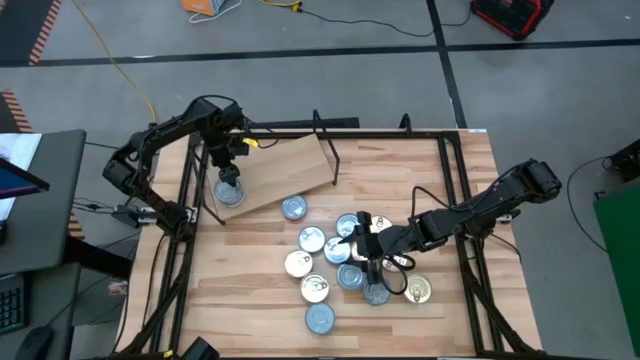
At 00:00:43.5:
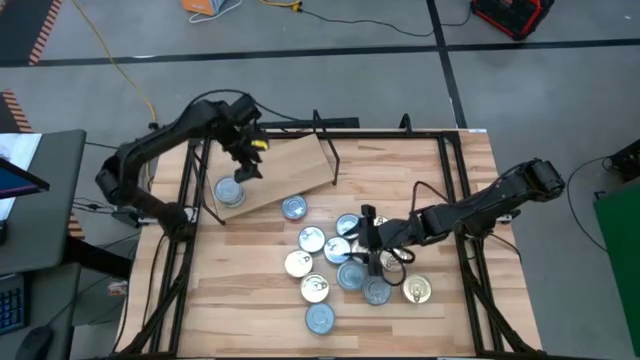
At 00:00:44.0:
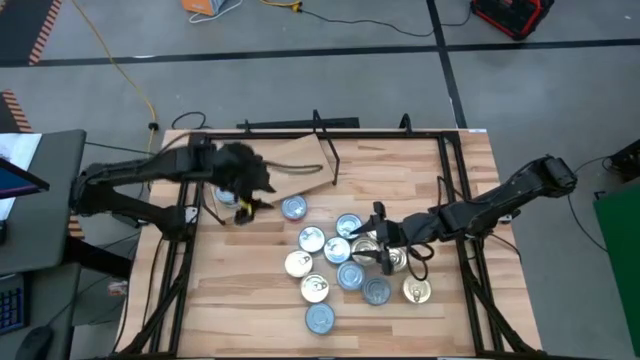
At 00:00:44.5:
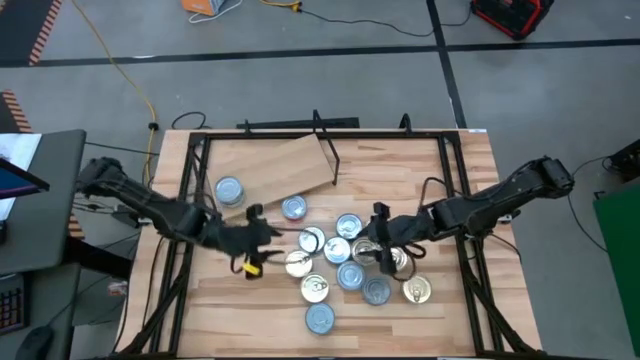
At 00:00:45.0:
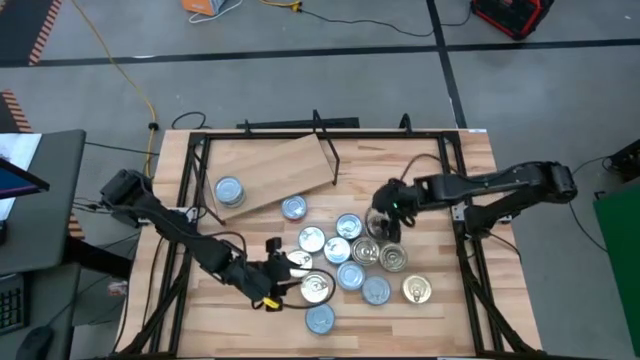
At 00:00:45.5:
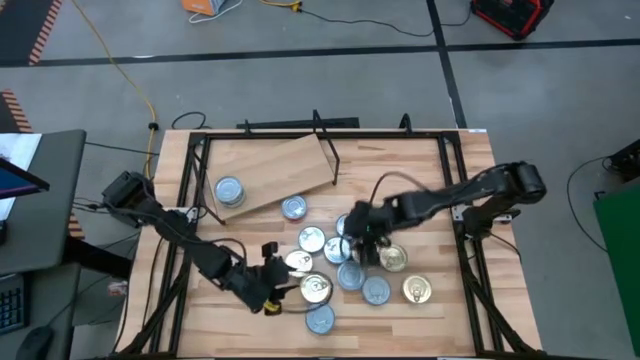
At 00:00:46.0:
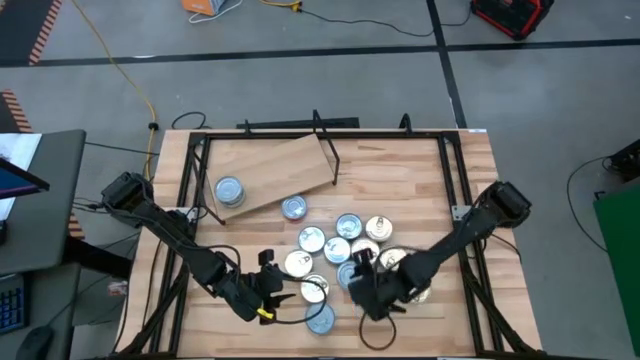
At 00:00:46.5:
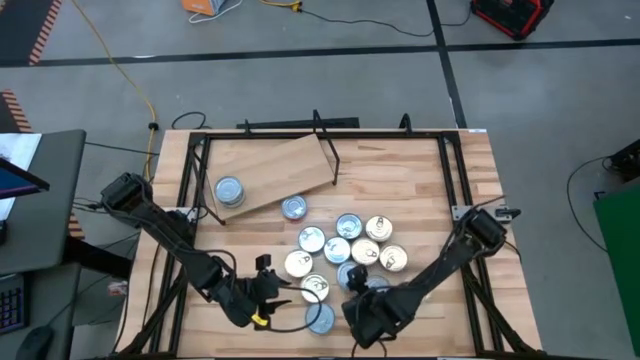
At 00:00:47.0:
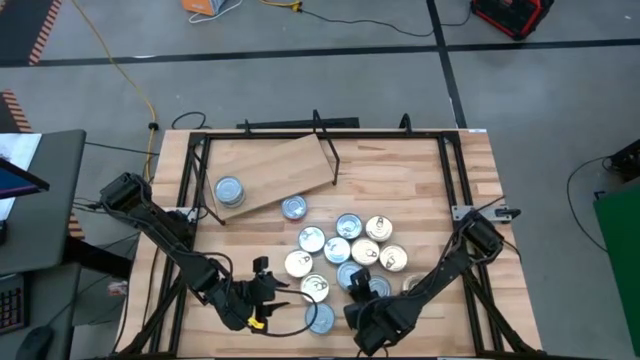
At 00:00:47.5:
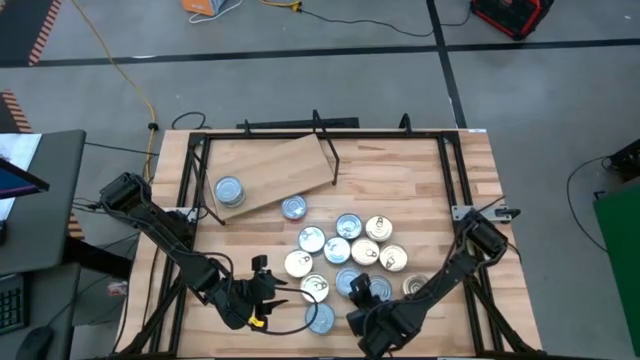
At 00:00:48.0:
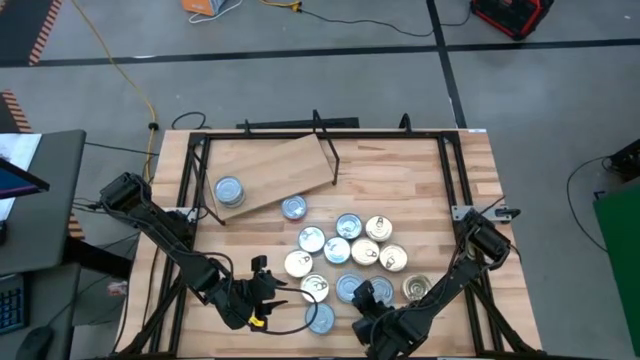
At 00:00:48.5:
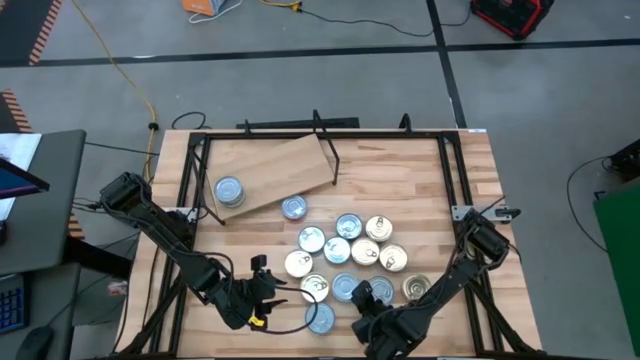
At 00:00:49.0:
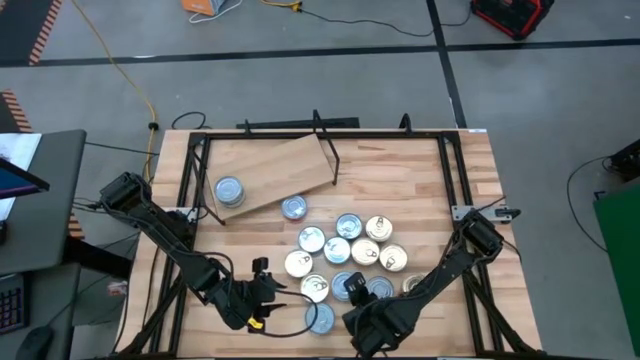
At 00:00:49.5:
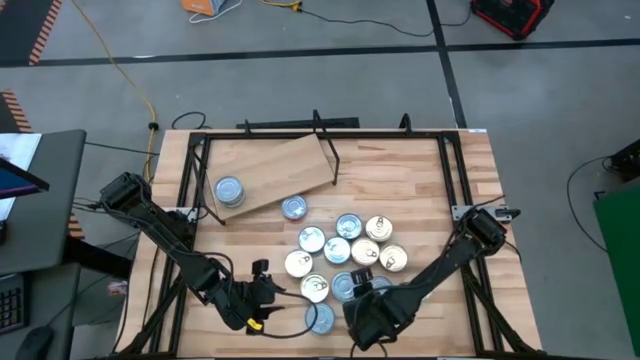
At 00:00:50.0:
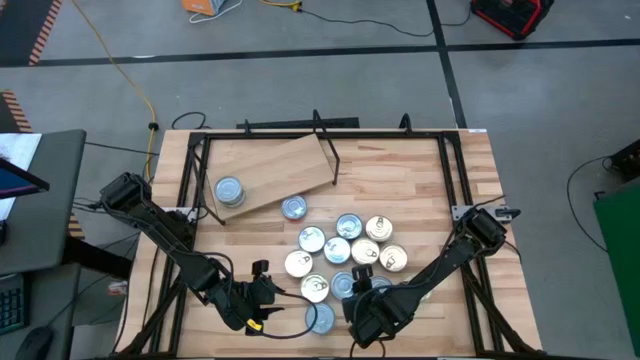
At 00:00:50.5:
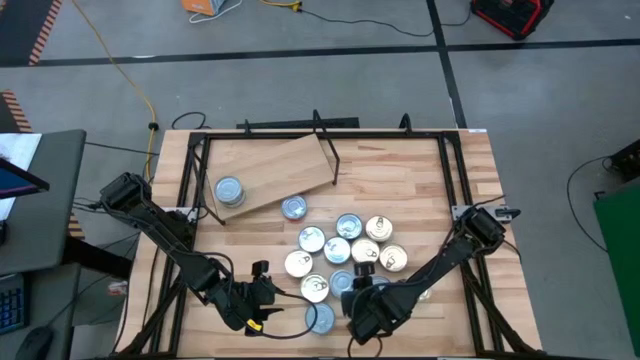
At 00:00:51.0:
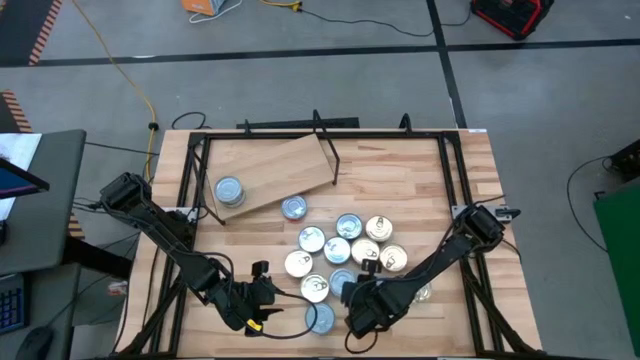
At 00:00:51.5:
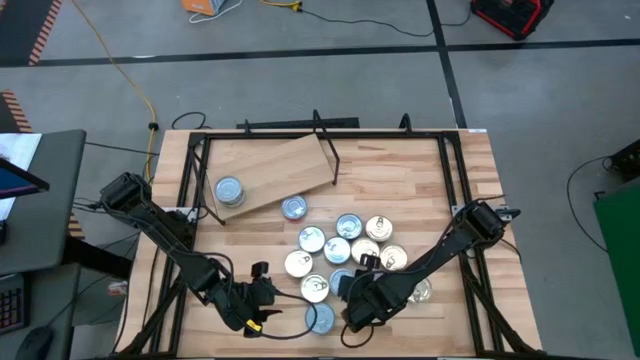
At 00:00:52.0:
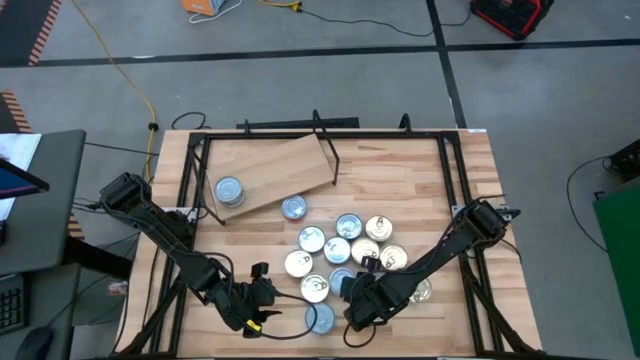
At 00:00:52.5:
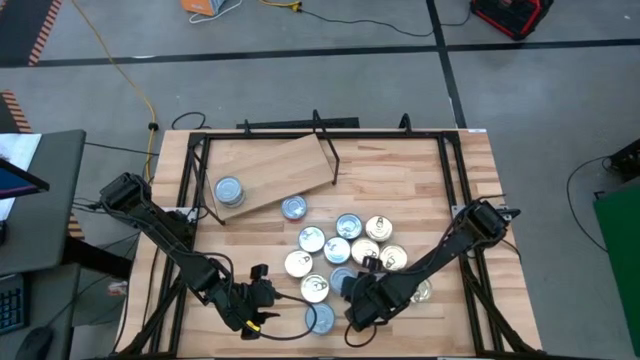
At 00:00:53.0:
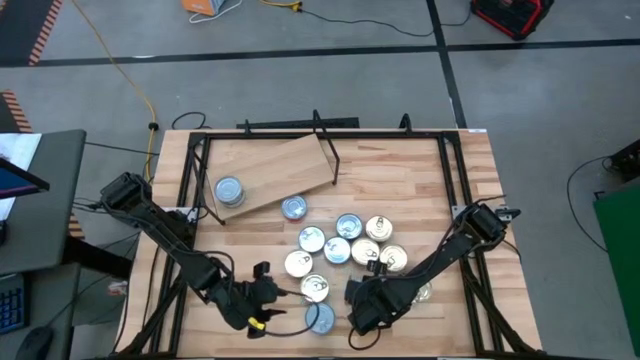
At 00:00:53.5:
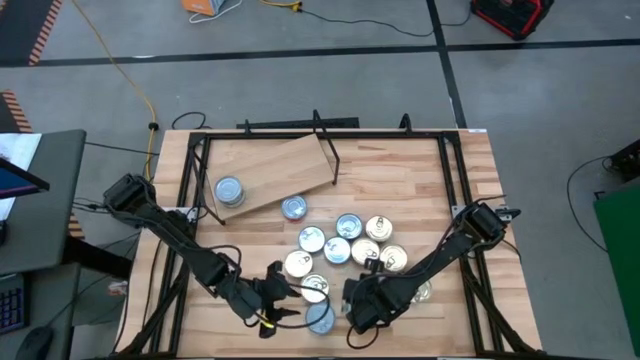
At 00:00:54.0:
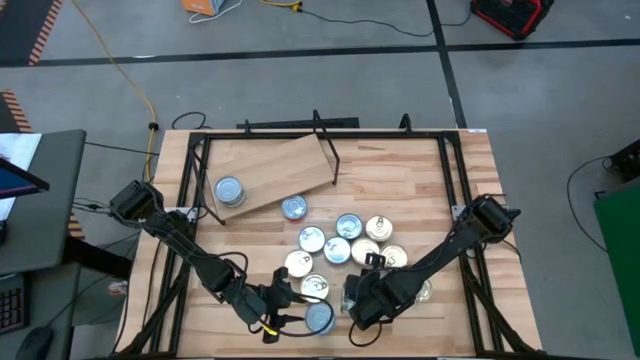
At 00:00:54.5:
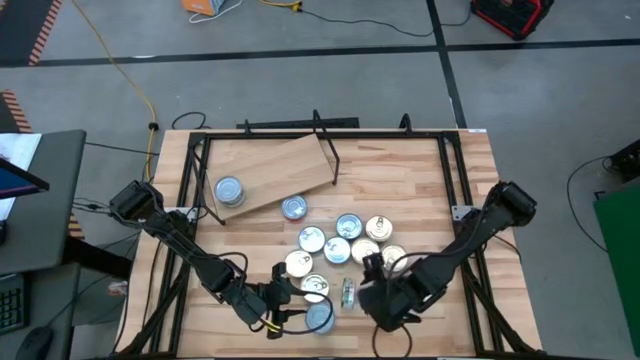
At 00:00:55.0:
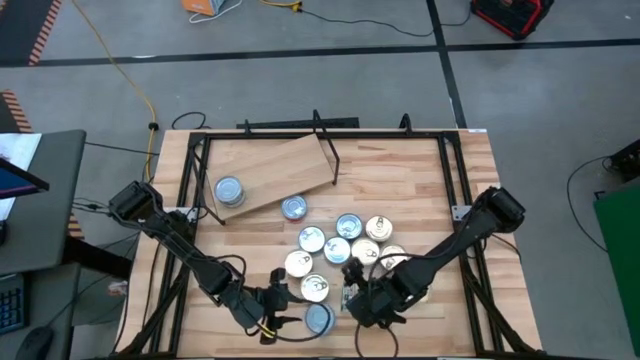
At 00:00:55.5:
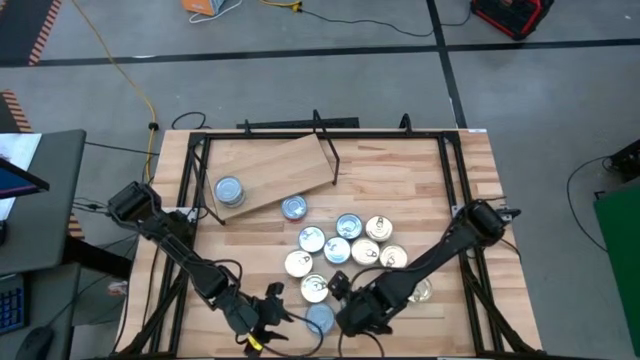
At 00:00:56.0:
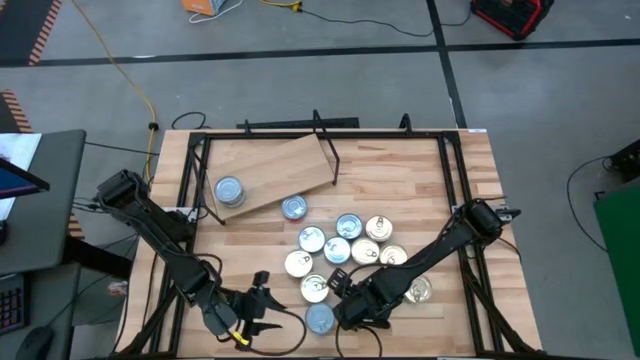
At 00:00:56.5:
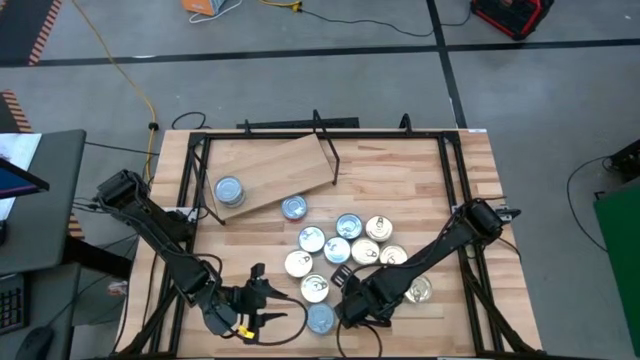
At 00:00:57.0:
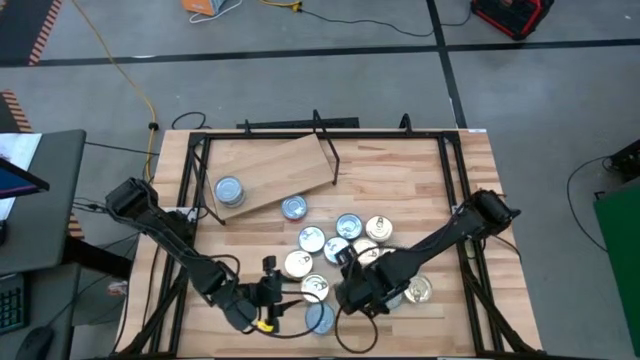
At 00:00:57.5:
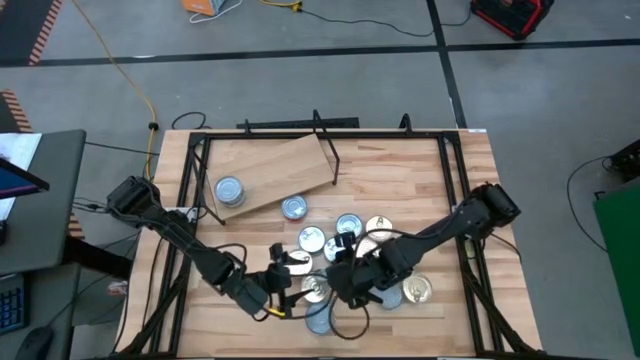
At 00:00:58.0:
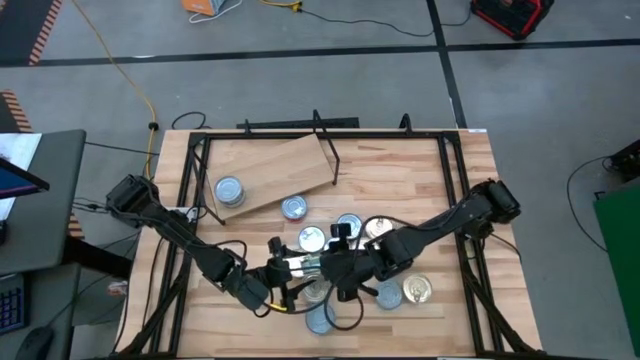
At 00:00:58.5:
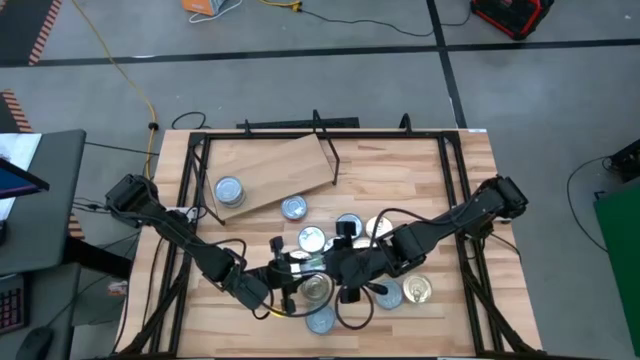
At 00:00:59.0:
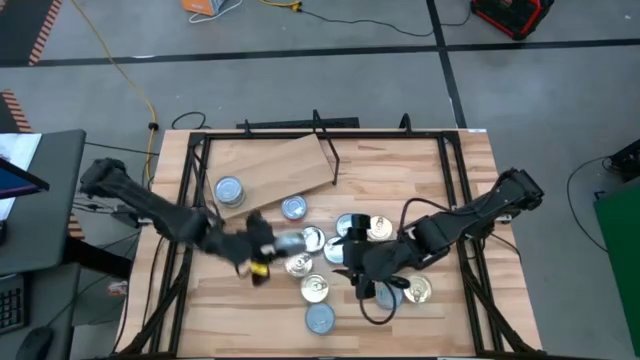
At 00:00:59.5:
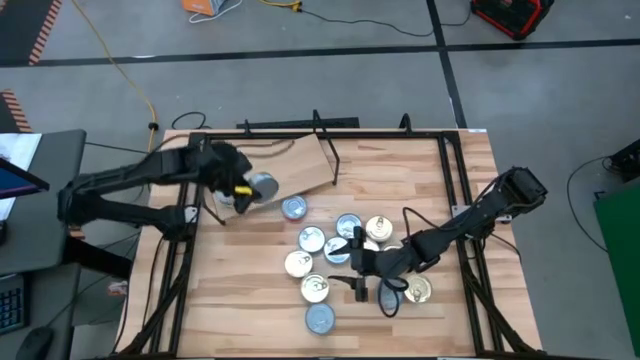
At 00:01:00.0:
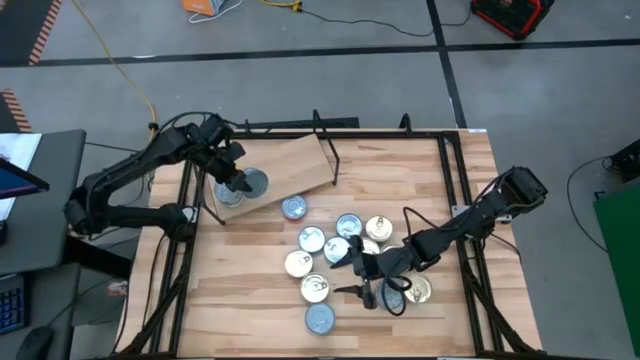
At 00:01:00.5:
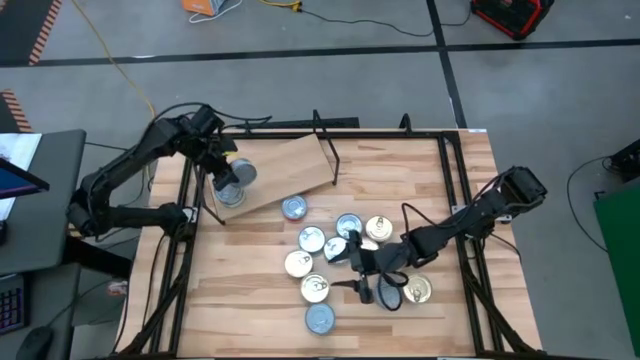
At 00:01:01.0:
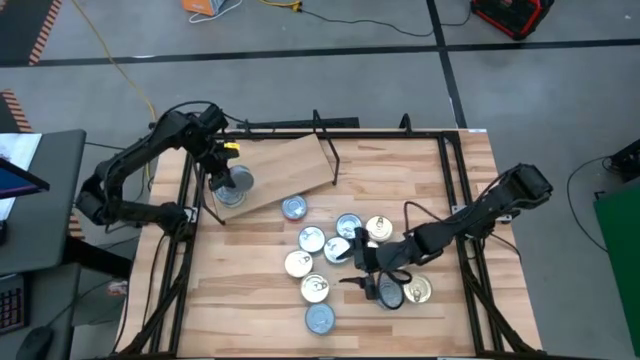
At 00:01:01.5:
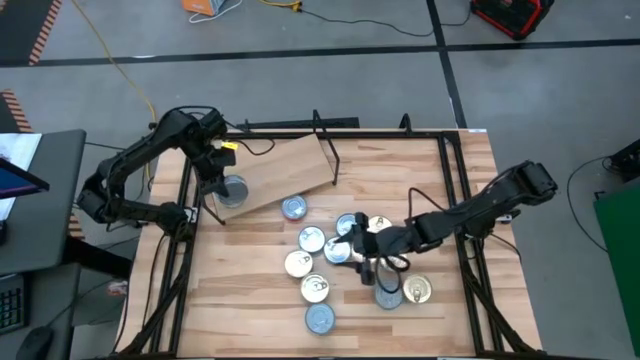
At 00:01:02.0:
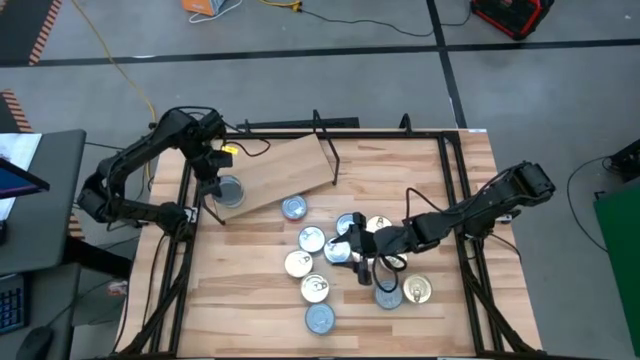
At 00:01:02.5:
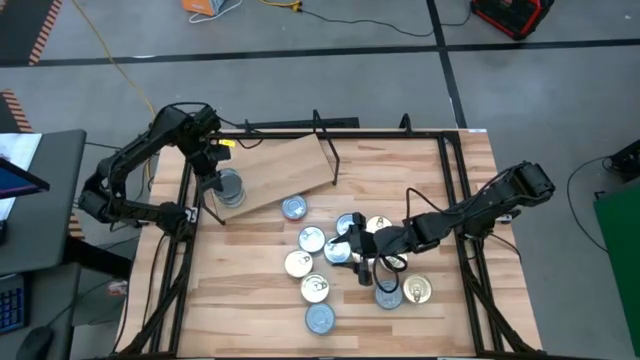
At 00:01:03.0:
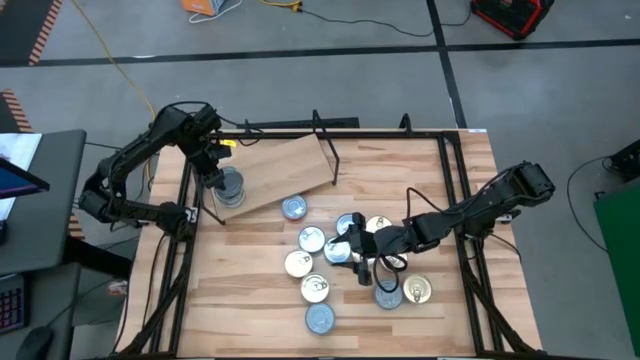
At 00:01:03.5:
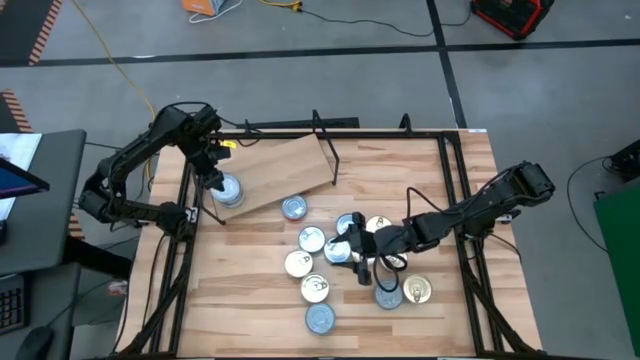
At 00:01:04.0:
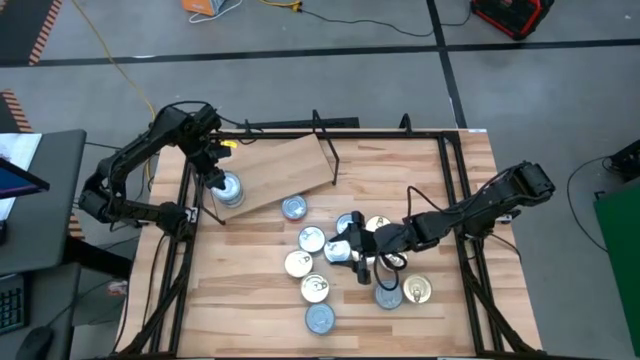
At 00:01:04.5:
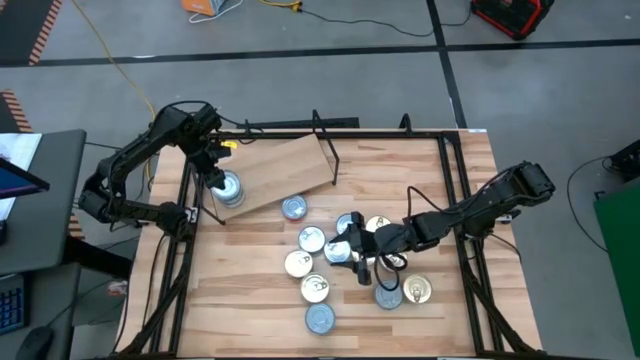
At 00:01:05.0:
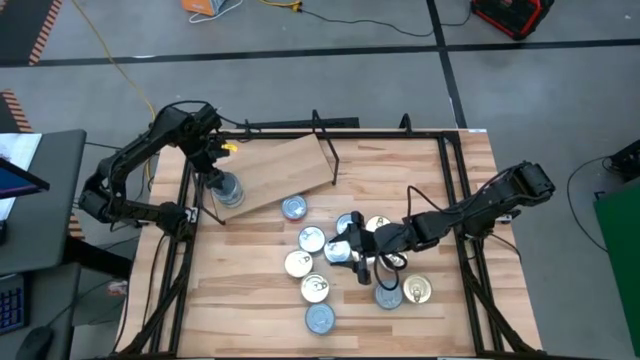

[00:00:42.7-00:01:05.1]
Task: Stack canned seafood by type on shelf
Stack the green white tuna can on top of the green white tuna can on the shelf
